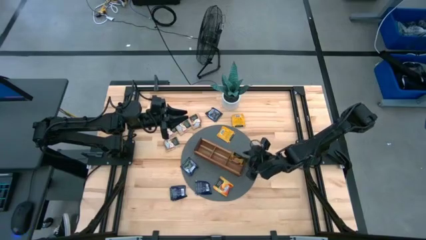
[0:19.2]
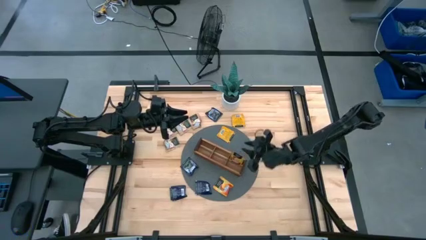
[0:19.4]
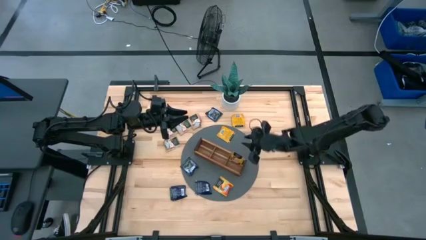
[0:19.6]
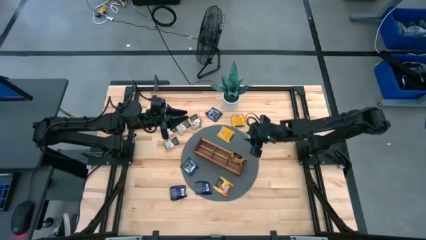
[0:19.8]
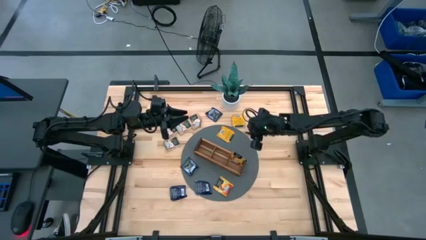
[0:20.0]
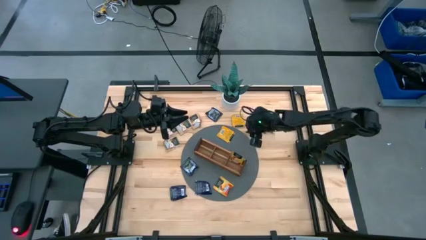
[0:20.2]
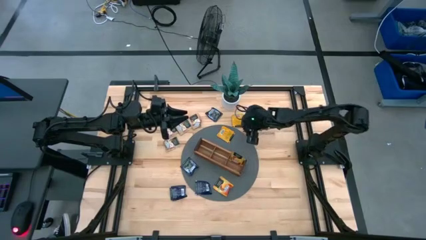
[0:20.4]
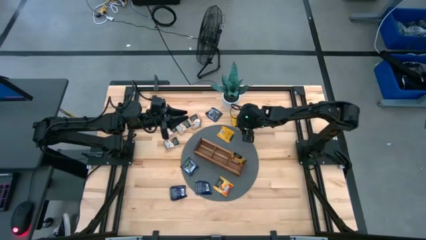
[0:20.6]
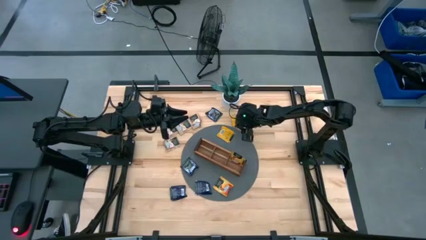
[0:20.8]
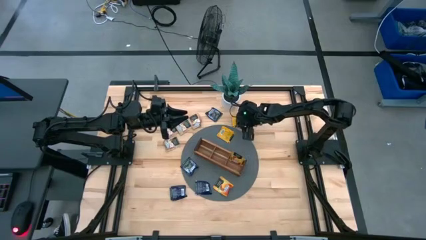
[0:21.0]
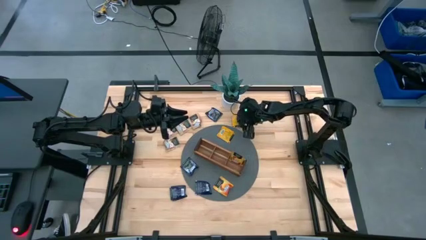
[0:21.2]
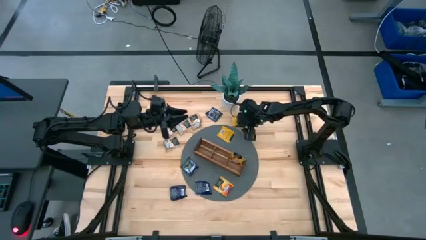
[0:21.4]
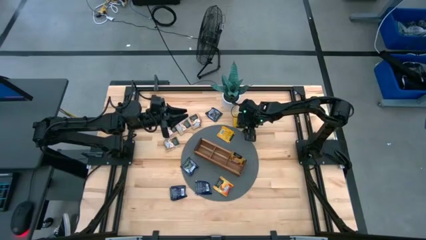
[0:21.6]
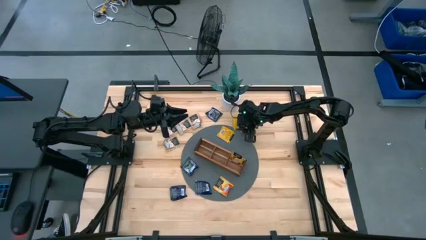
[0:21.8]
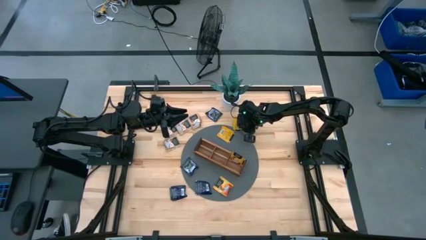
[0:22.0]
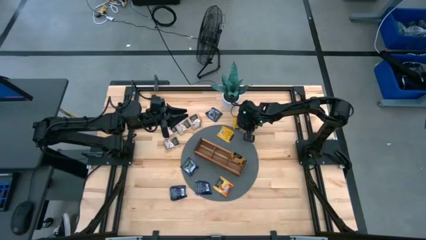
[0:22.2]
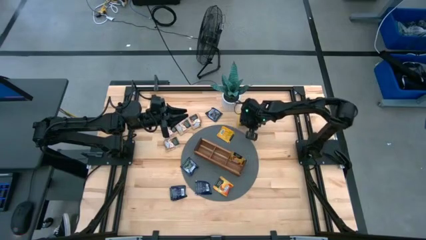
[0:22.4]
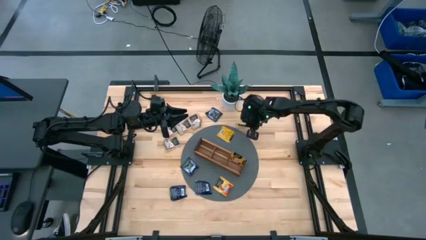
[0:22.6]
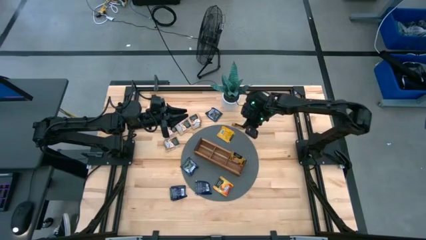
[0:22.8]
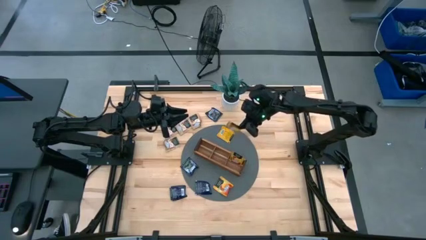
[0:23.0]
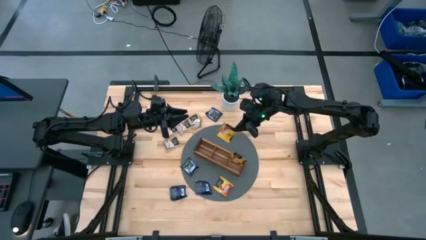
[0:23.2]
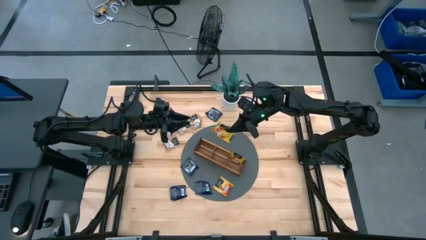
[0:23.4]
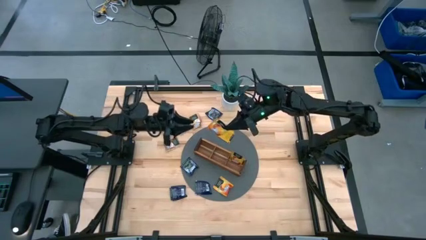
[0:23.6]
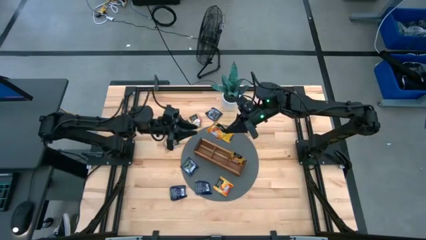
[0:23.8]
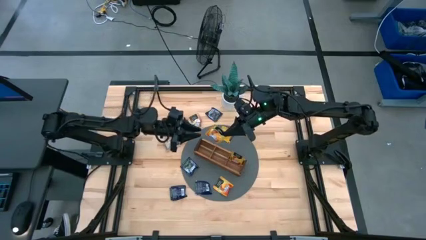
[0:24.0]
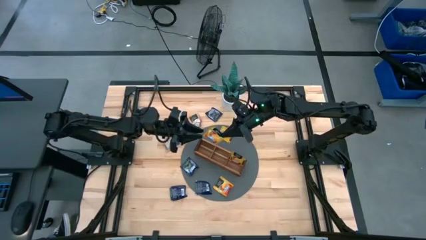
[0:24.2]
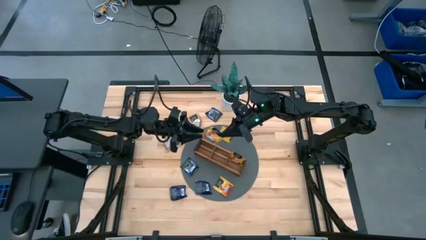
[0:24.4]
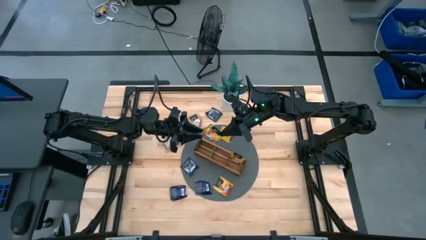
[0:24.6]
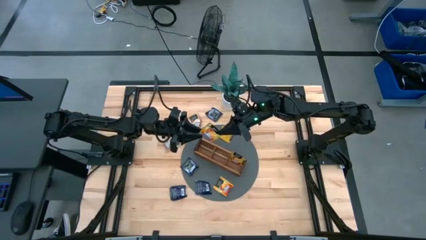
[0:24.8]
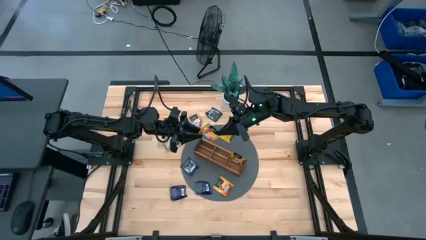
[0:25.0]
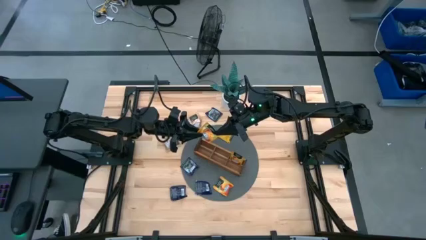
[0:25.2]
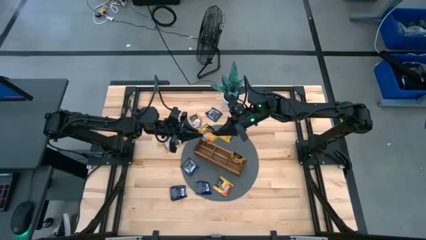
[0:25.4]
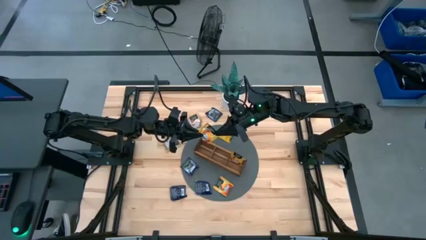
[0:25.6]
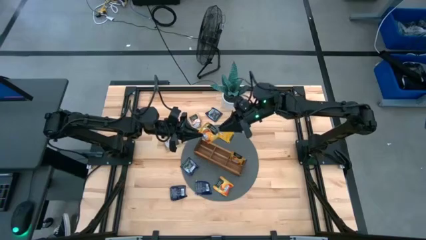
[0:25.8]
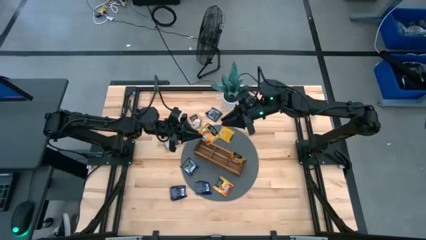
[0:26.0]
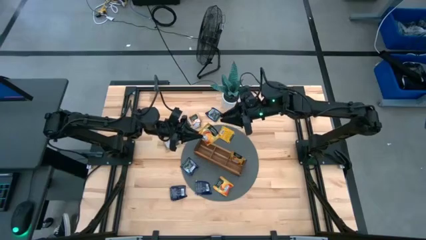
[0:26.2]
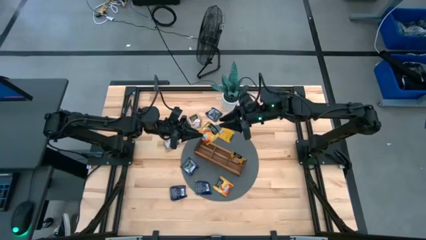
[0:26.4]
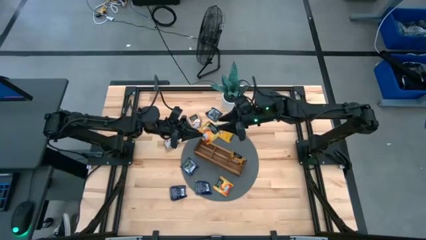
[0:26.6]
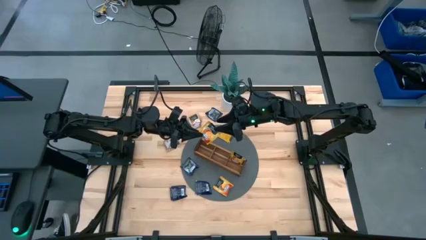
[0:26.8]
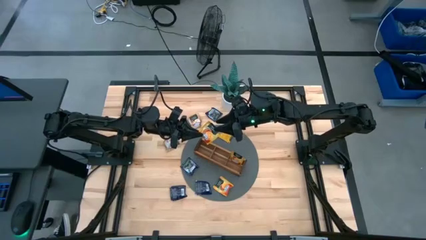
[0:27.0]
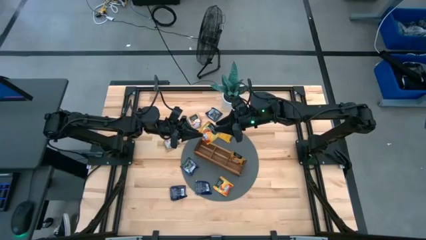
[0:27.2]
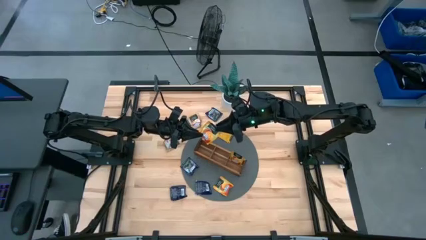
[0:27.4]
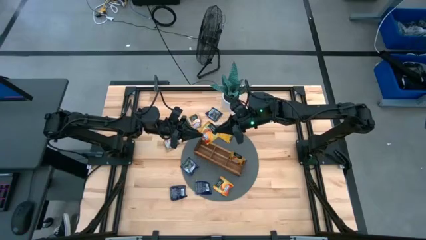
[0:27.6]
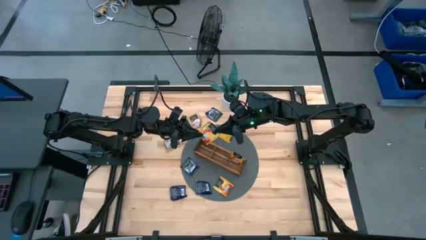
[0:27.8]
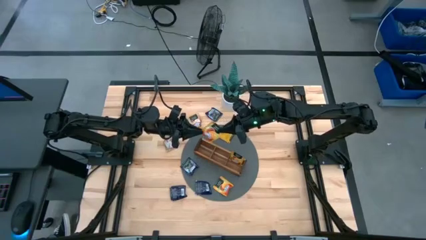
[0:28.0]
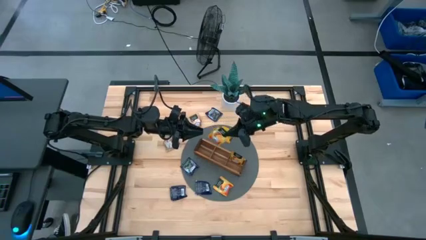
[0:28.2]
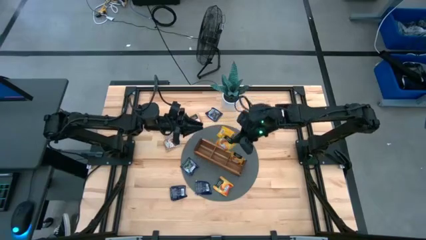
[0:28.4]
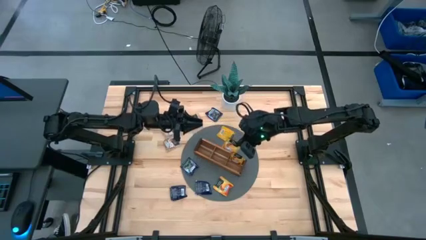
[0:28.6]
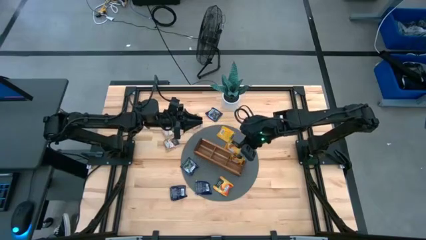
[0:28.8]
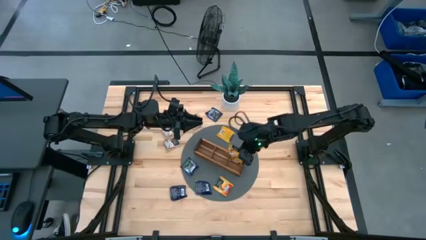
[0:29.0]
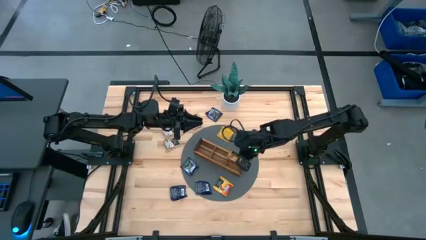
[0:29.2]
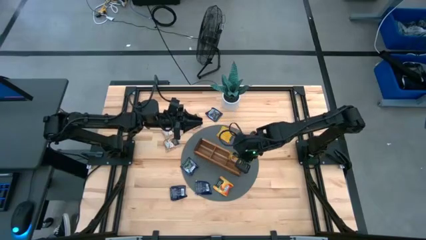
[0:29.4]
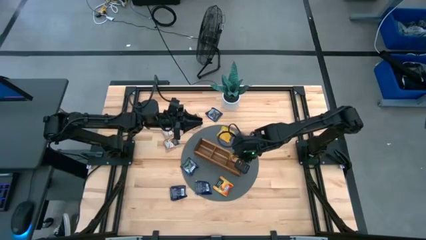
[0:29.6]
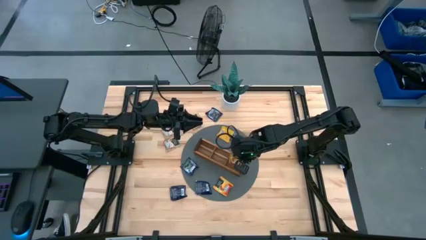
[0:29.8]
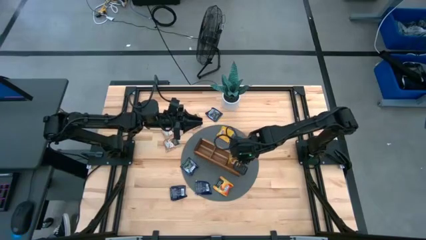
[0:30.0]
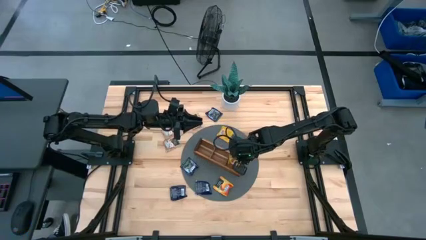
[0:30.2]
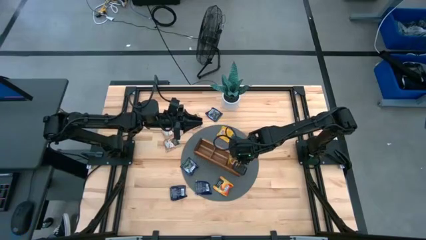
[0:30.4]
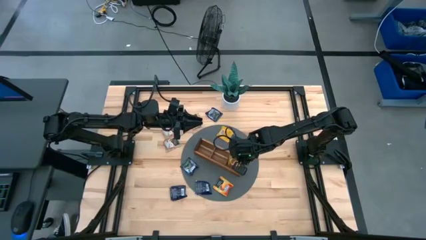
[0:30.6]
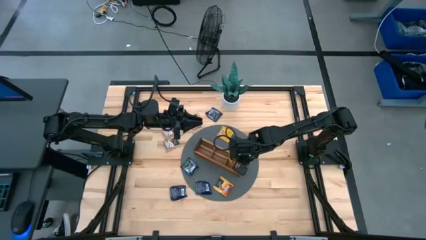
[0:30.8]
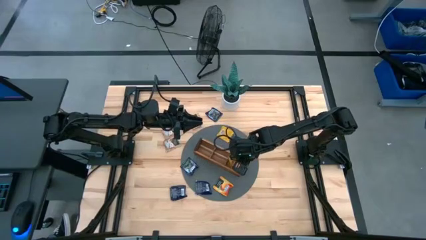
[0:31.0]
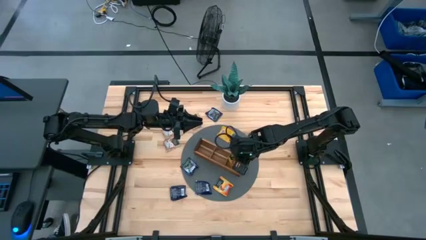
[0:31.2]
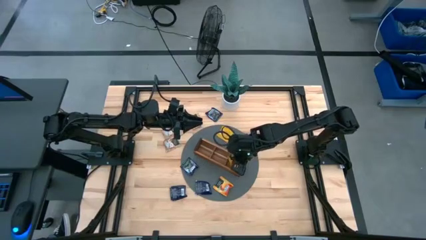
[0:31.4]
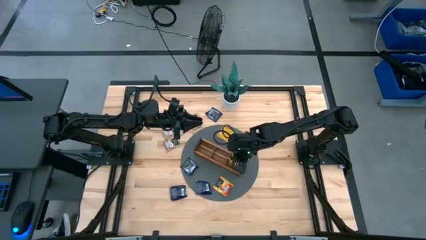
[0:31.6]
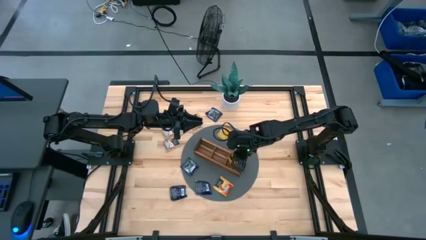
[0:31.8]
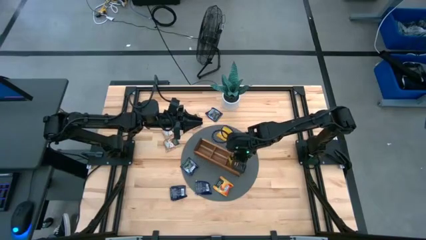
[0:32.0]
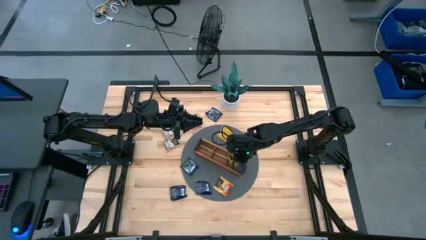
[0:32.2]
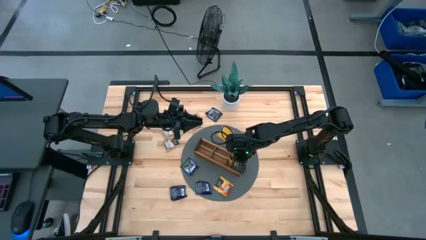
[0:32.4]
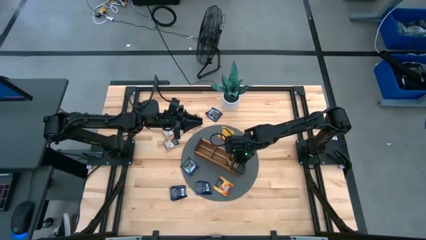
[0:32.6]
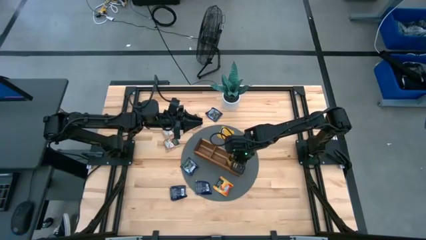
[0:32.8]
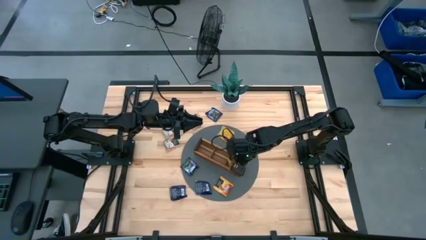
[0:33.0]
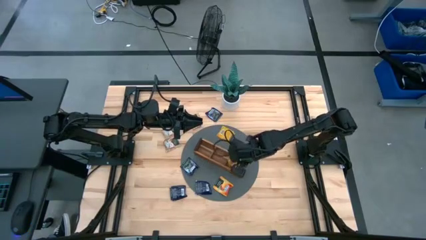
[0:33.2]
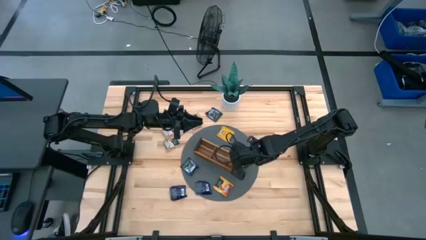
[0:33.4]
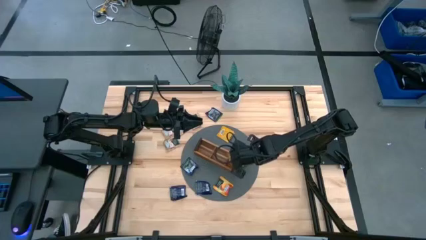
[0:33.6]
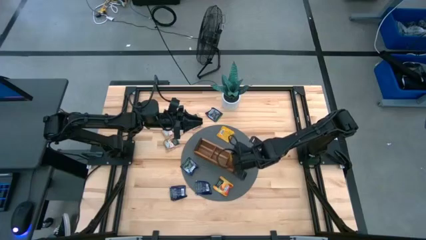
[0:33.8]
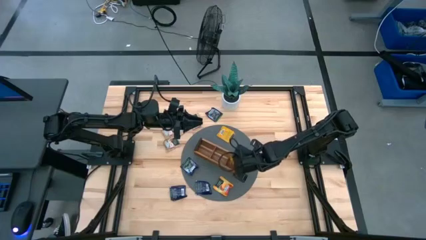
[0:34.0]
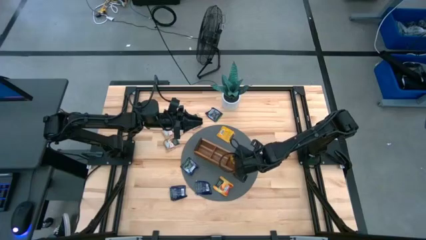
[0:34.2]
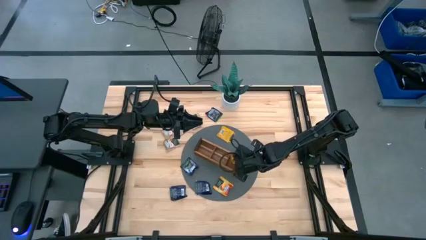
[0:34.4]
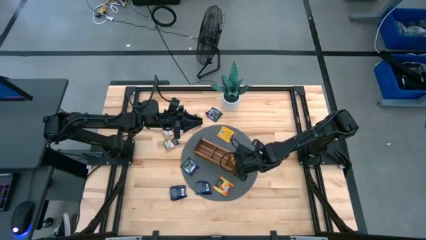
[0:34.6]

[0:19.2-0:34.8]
Task: Pick & Place Tea
Put the yellow tea bag into the right section of the wooden organizer
